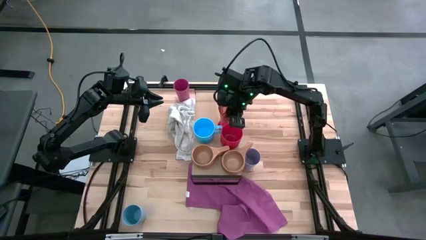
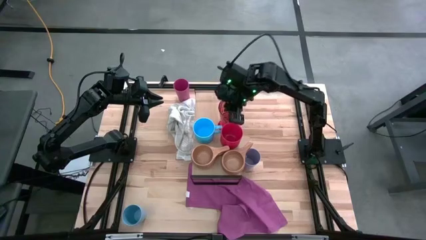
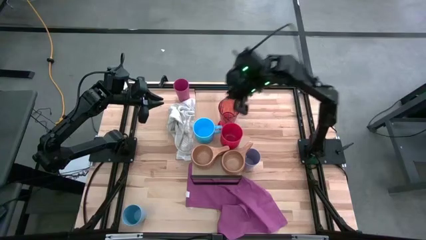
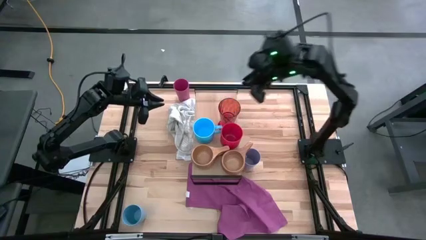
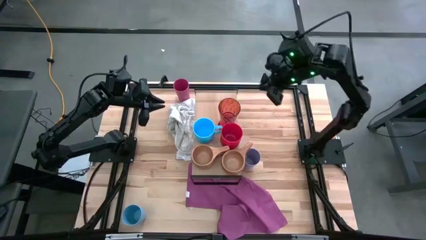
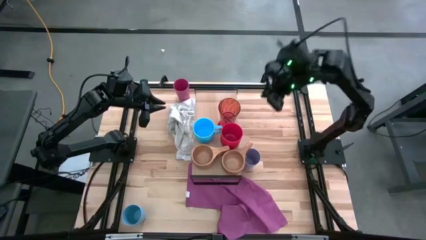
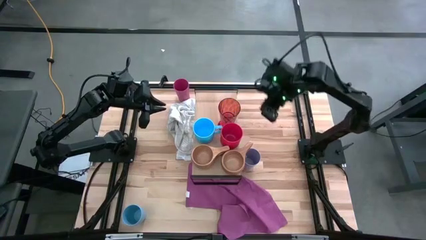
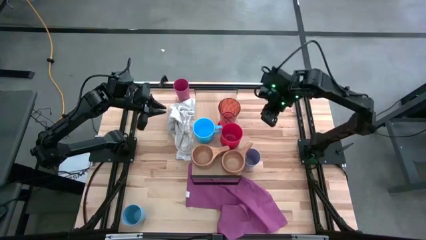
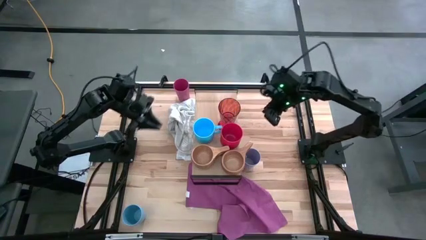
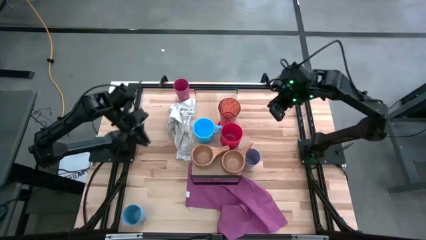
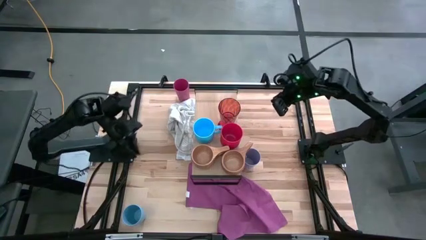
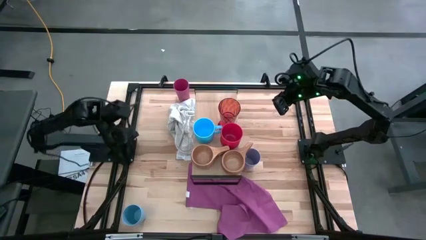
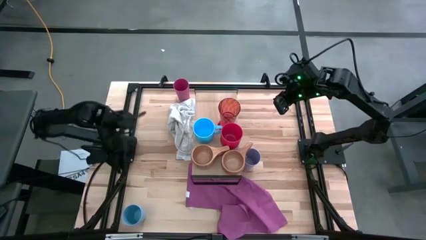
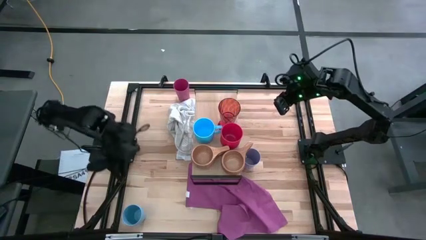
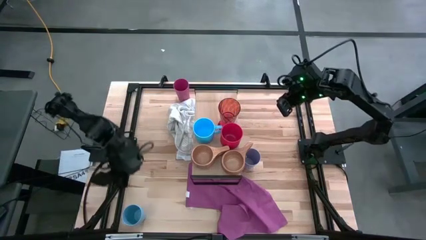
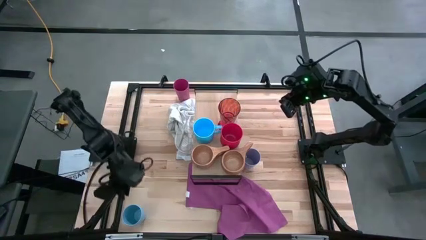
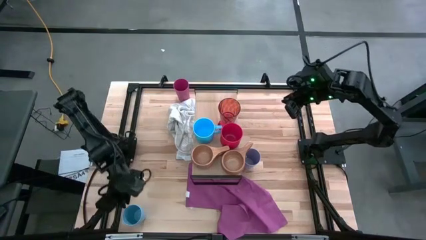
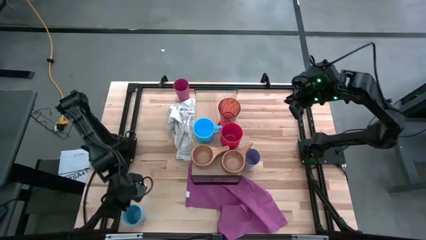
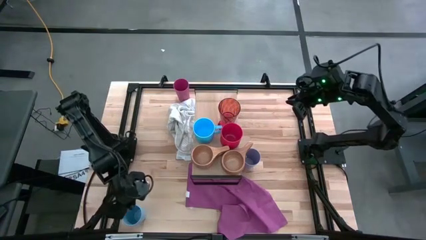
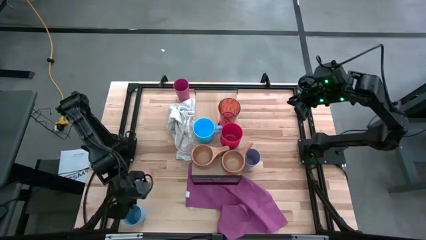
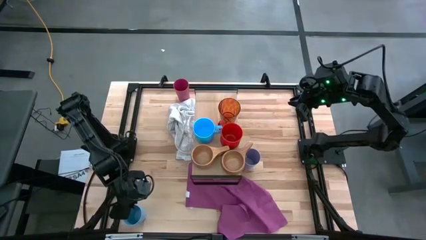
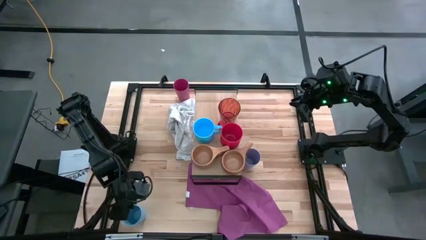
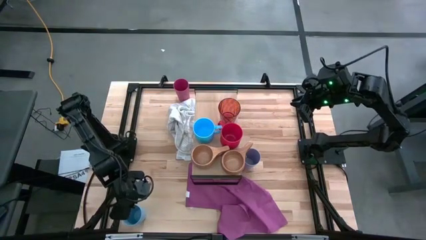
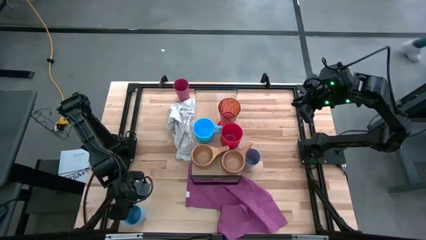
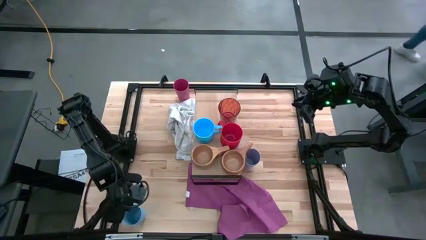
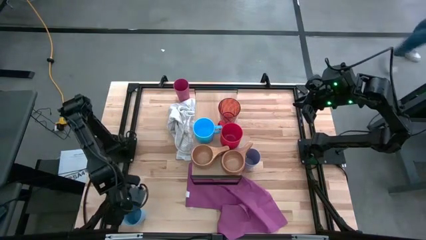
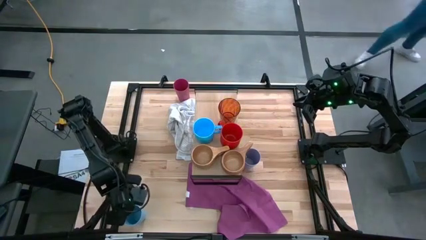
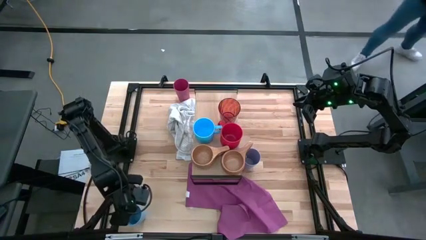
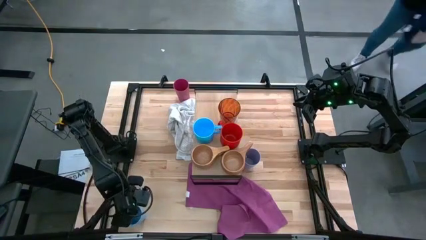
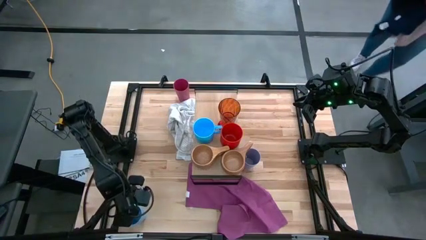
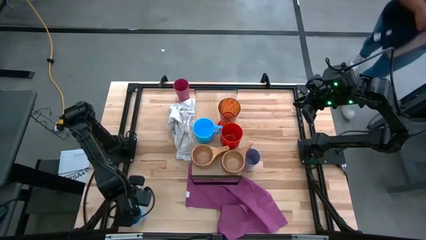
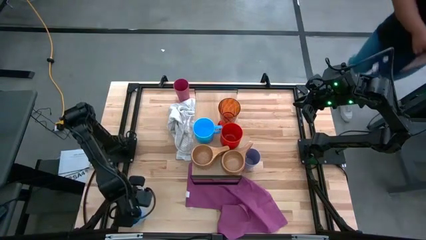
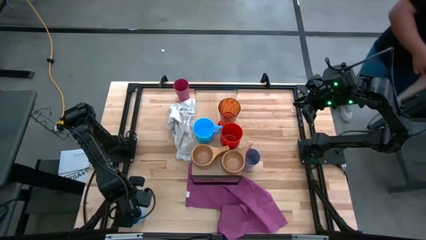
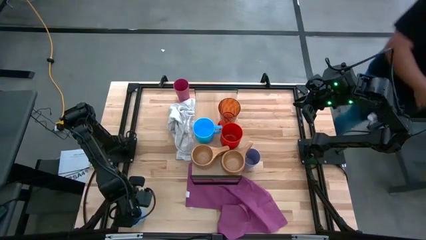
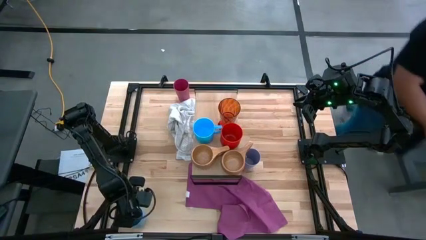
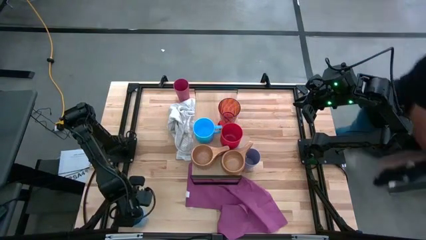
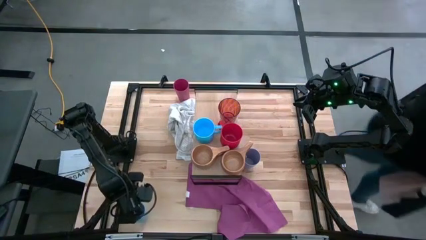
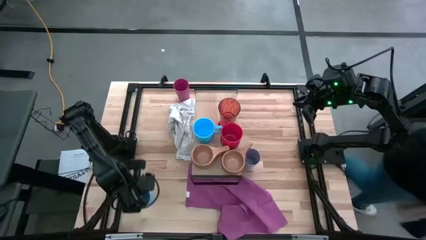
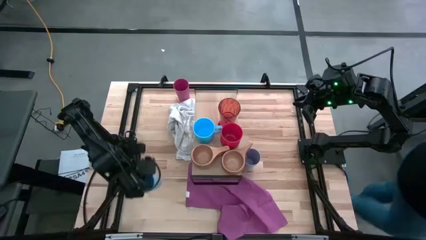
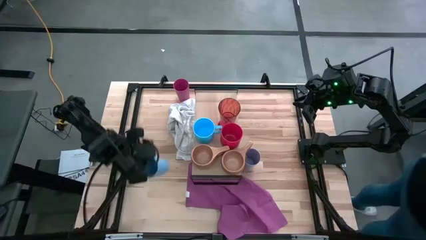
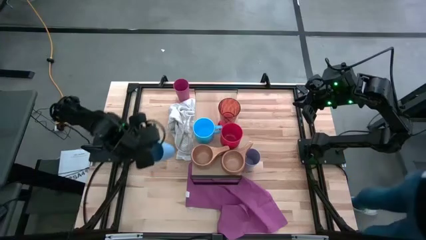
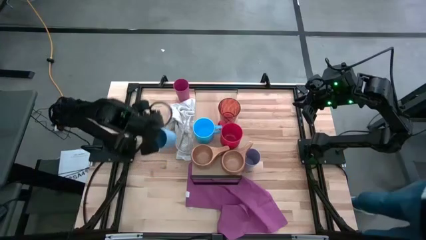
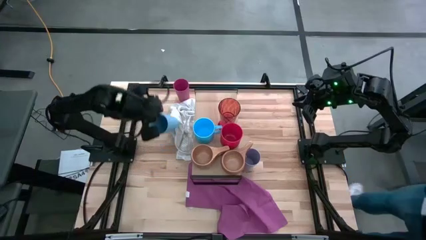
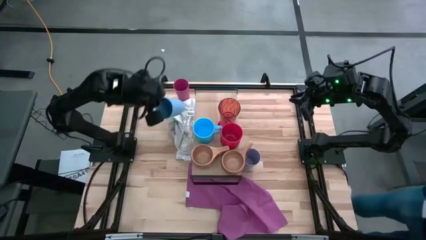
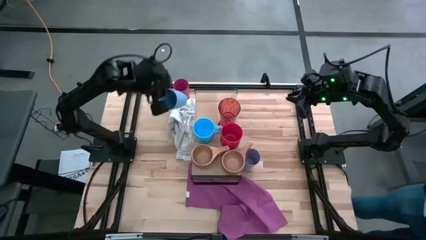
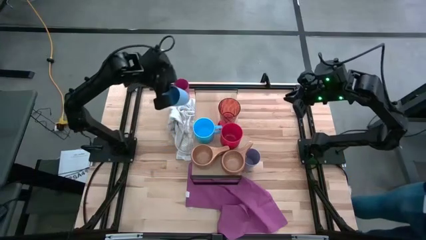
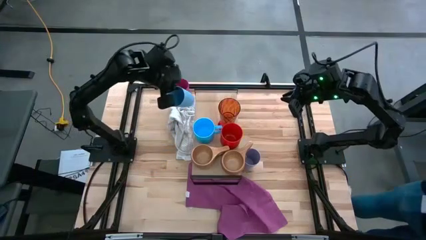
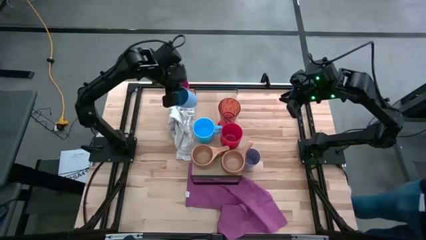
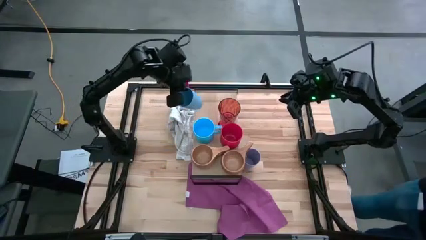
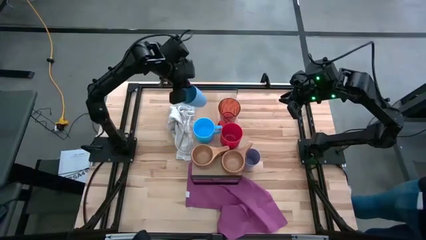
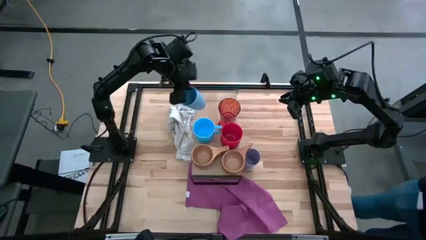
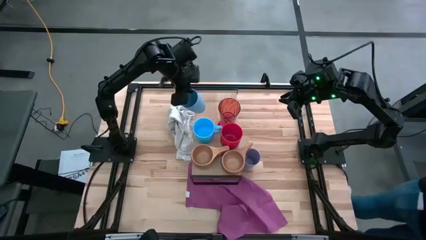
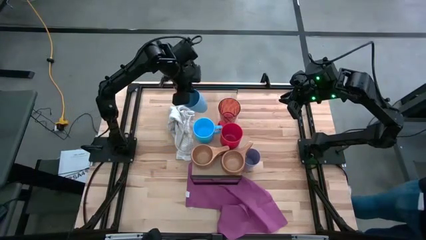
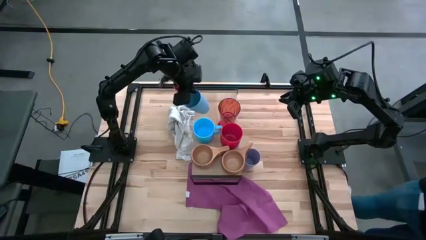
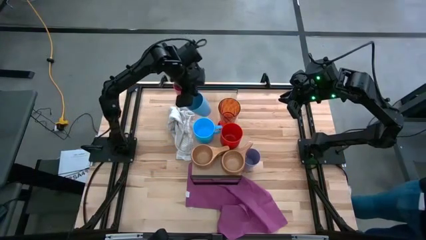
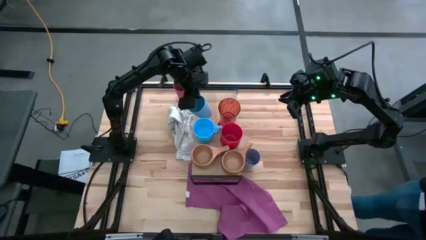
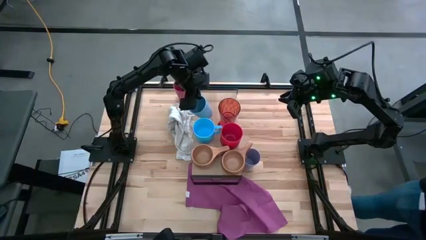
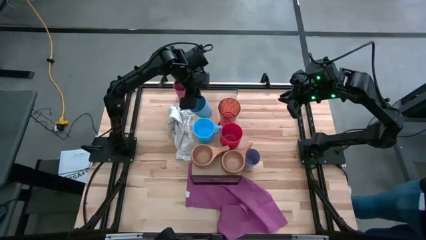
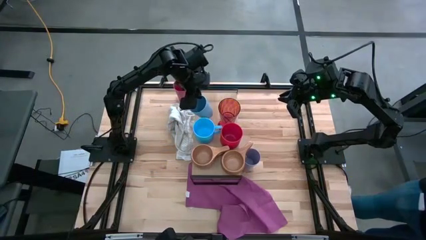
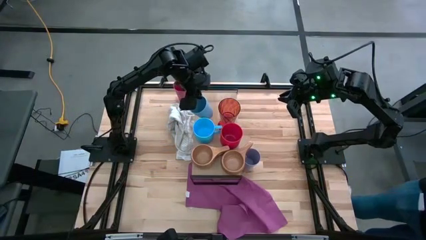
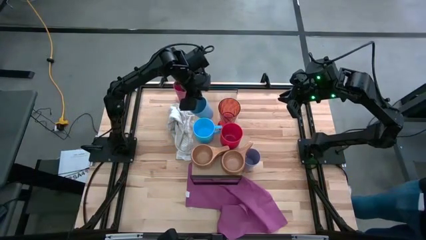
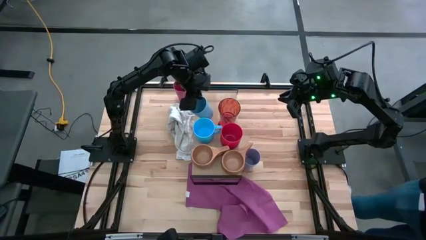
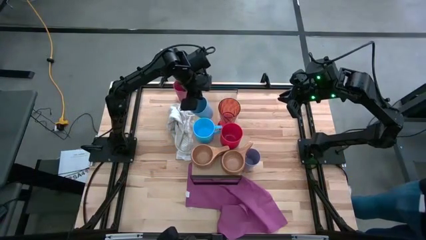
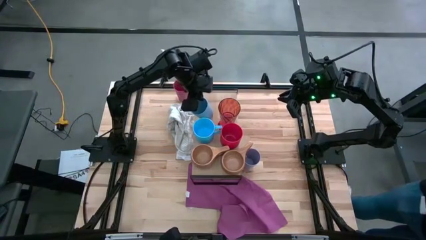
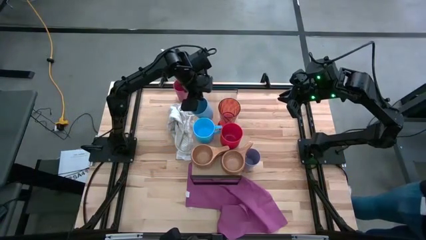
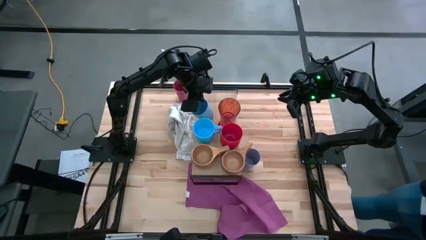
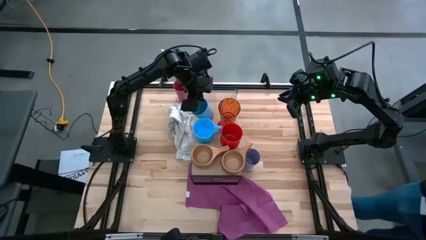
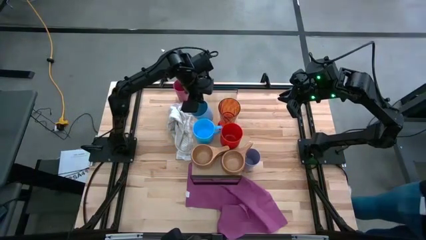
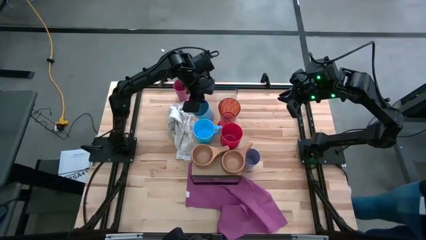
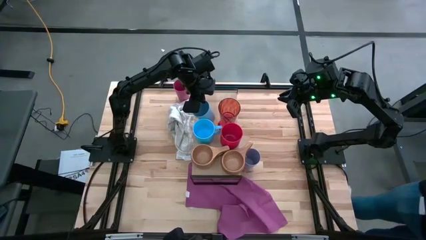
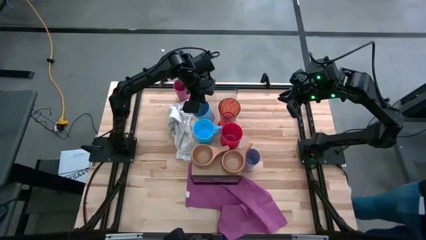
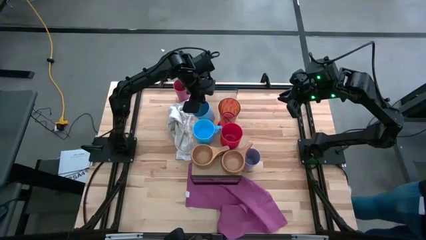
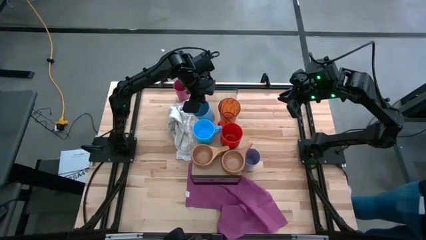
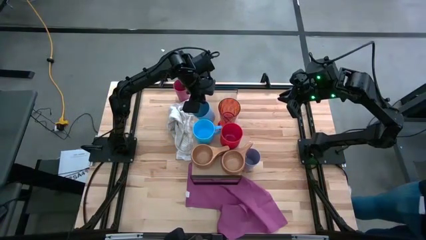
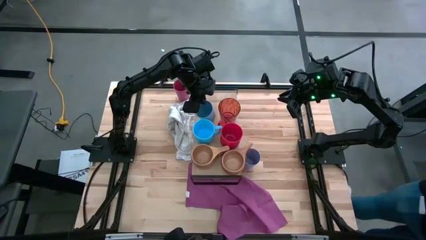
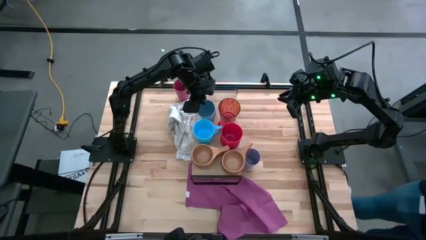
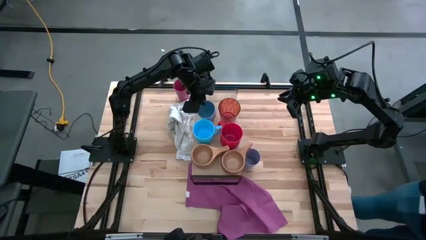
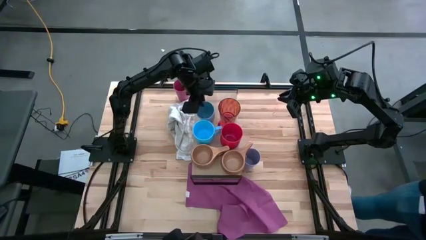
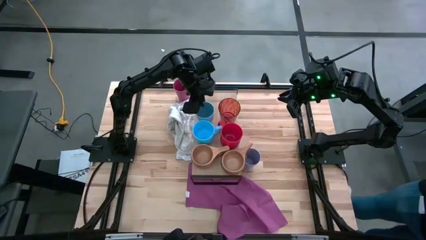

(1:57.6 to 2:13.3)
Task: Stack small to large cups/mugs on shelf
Put the blue cup on the shelf
